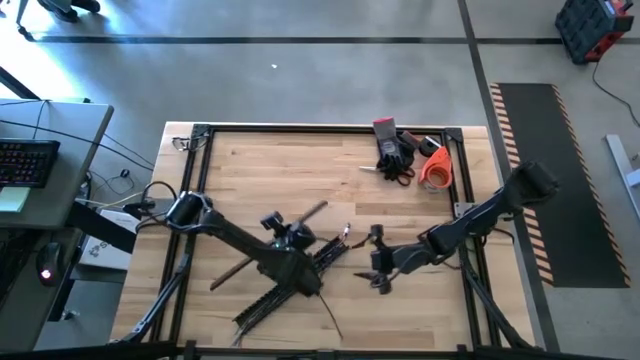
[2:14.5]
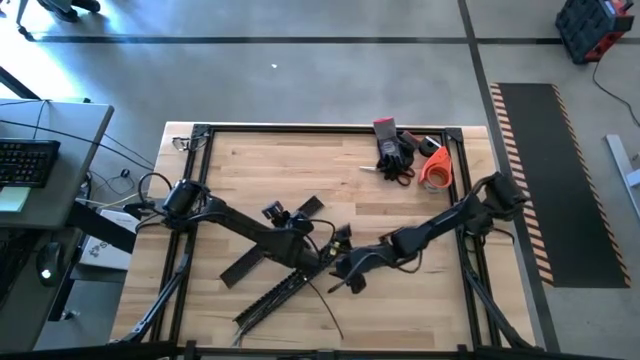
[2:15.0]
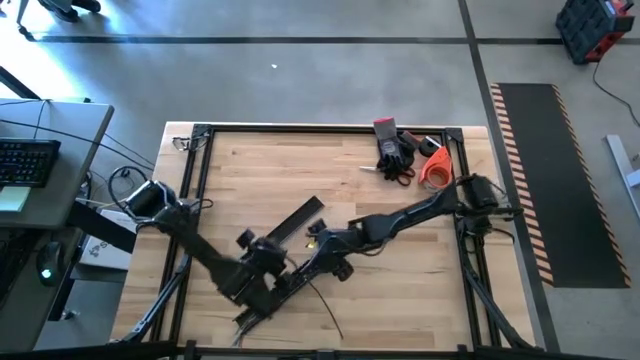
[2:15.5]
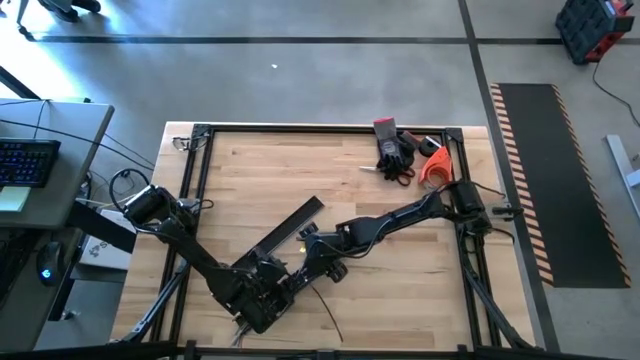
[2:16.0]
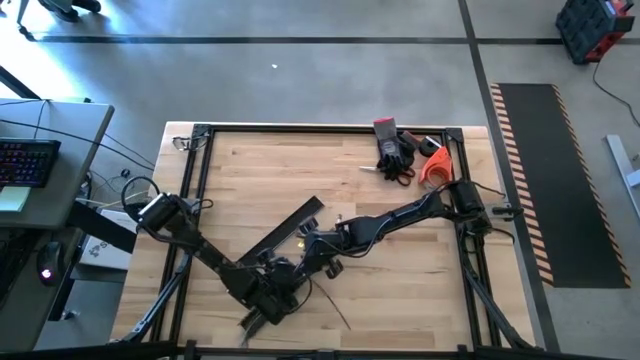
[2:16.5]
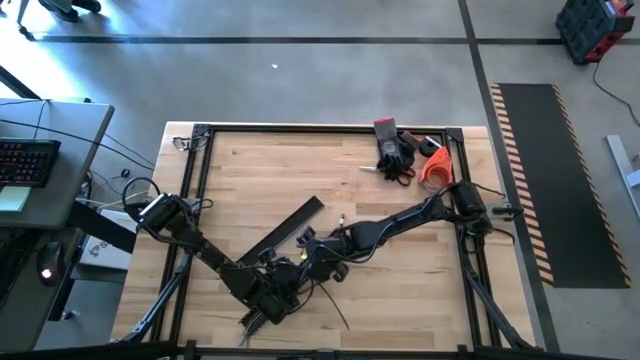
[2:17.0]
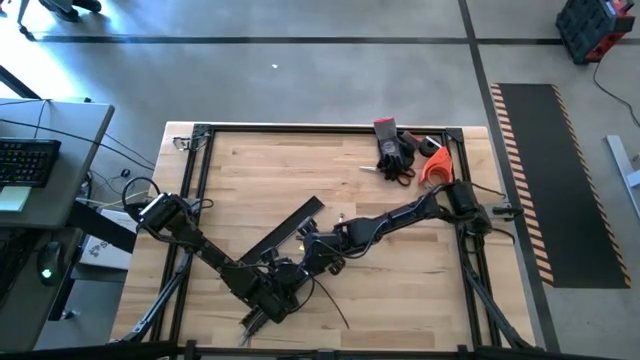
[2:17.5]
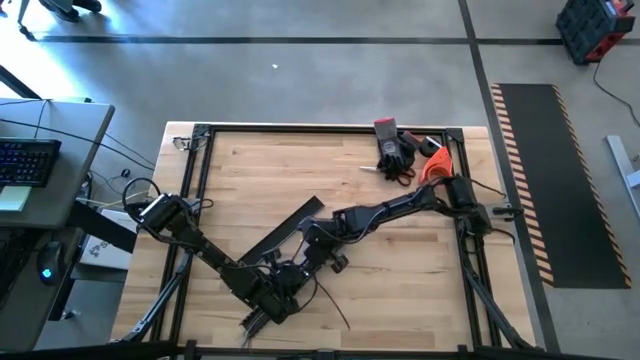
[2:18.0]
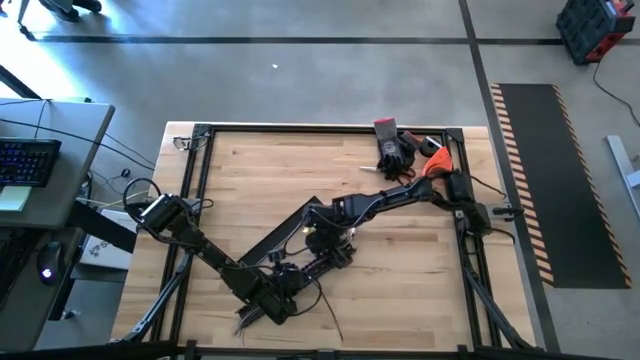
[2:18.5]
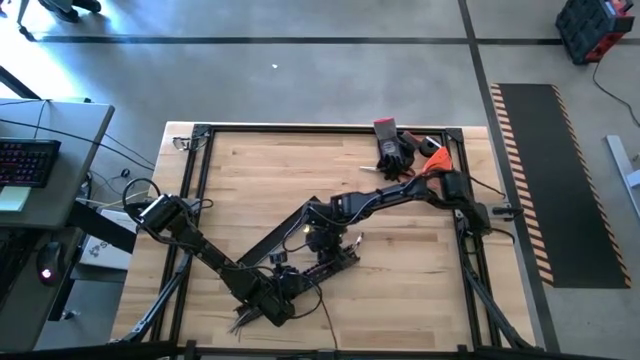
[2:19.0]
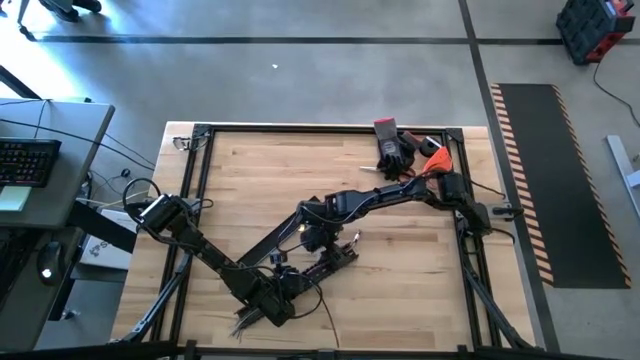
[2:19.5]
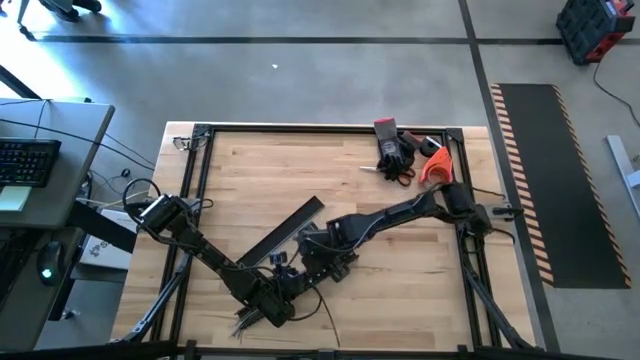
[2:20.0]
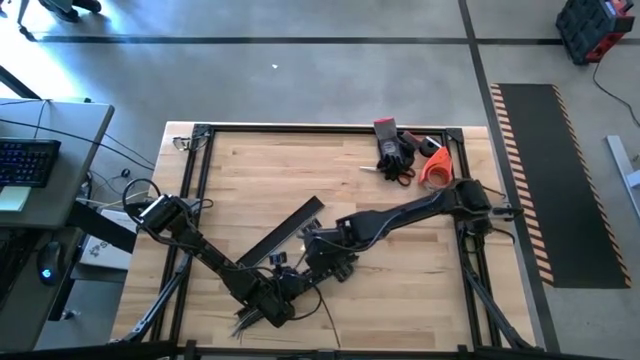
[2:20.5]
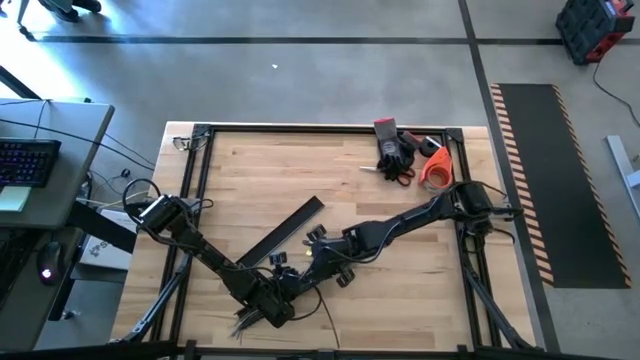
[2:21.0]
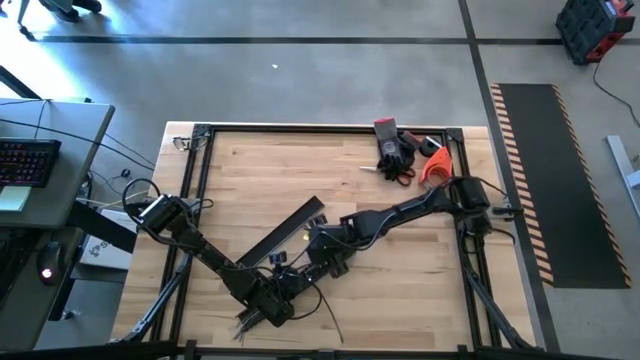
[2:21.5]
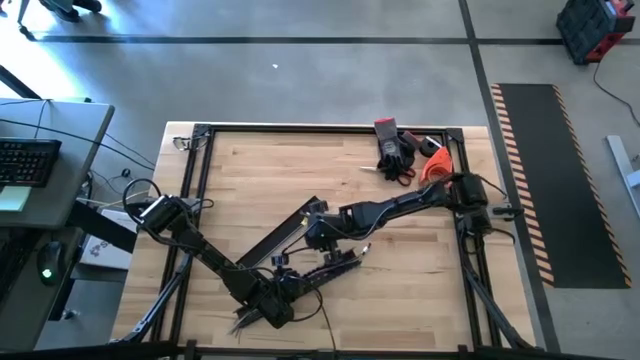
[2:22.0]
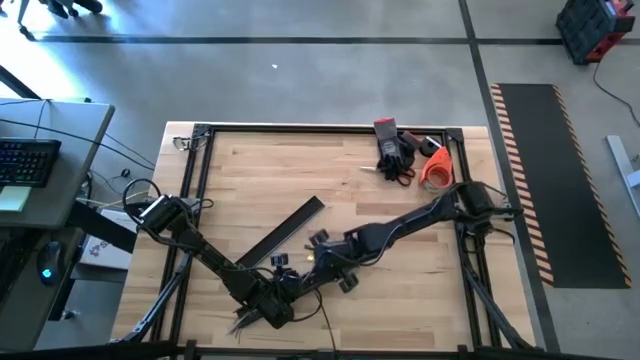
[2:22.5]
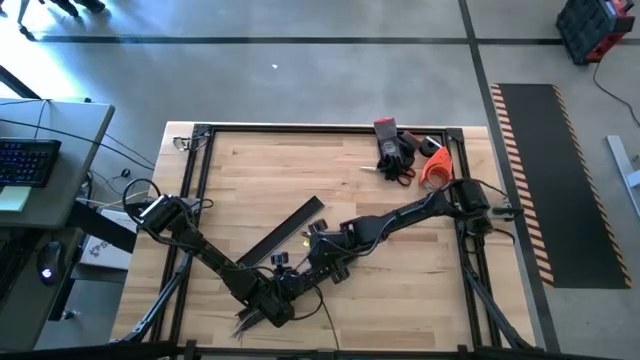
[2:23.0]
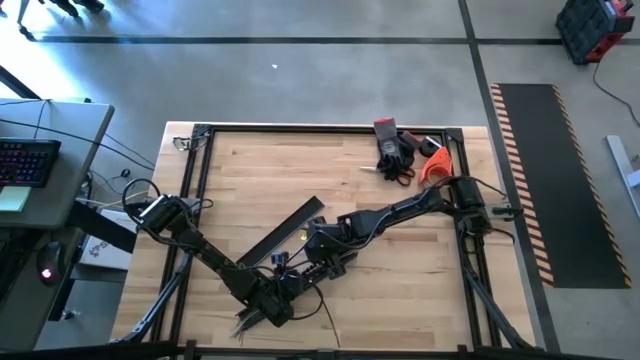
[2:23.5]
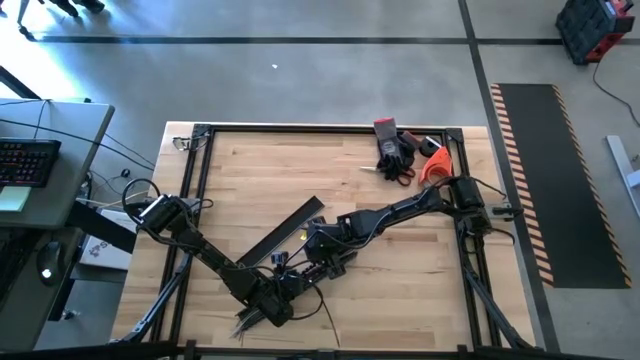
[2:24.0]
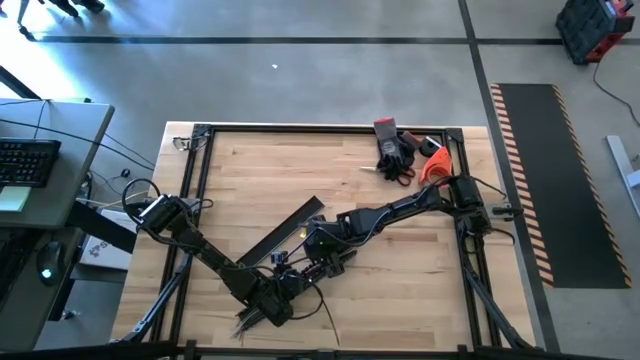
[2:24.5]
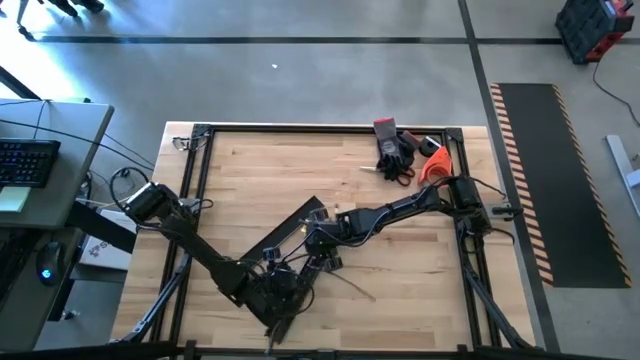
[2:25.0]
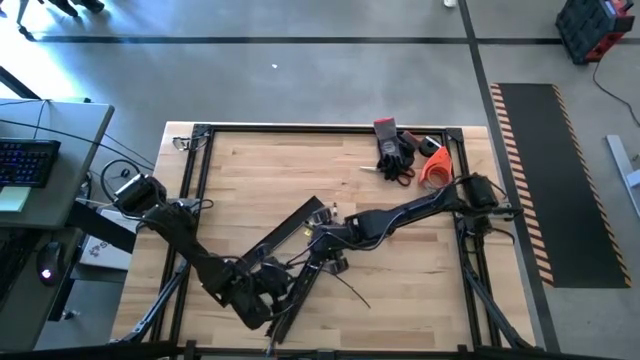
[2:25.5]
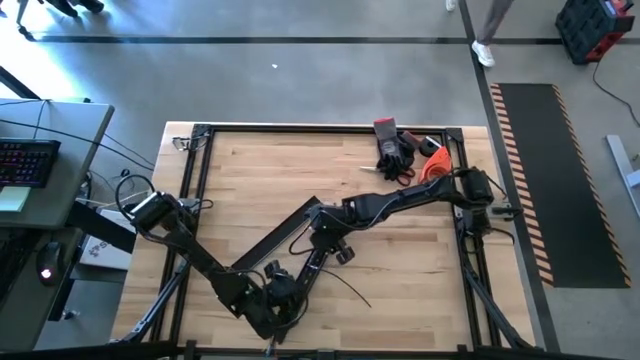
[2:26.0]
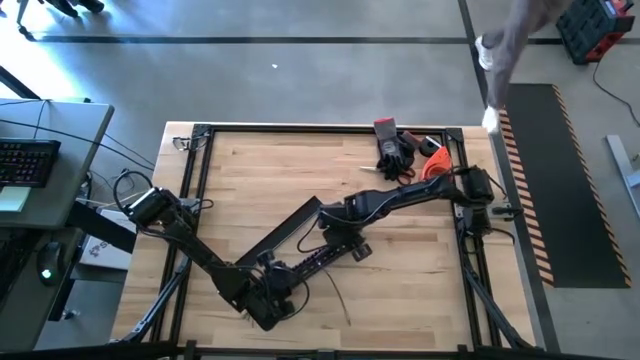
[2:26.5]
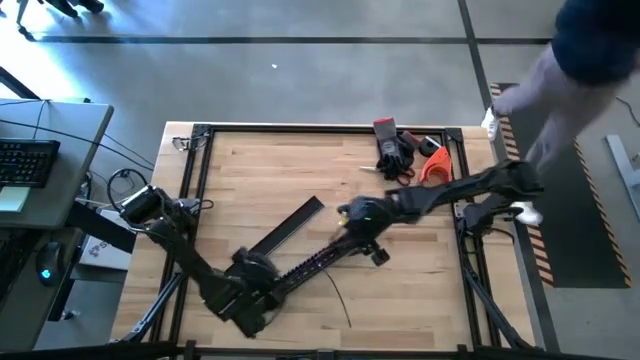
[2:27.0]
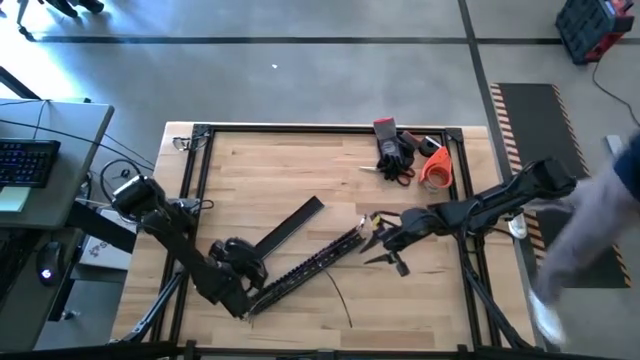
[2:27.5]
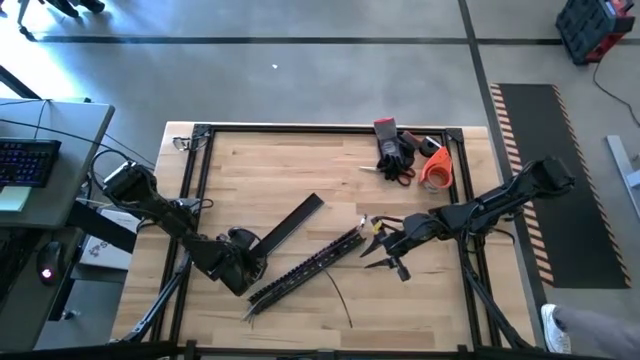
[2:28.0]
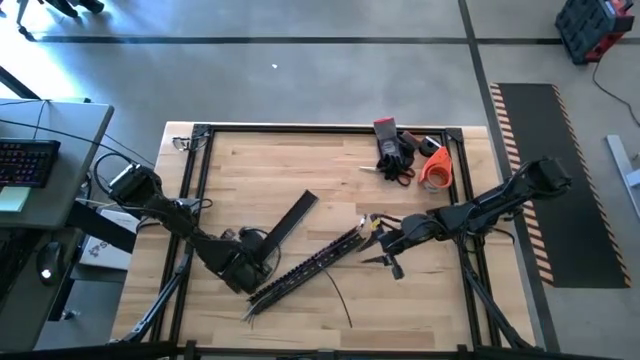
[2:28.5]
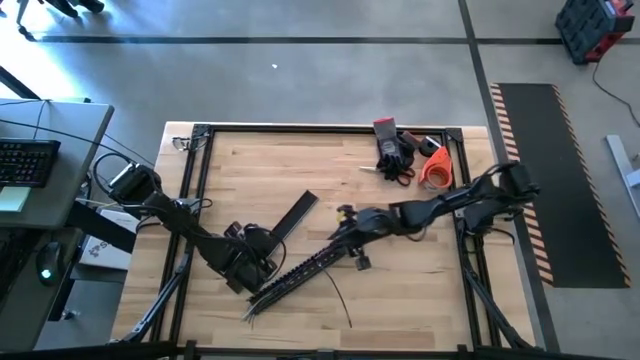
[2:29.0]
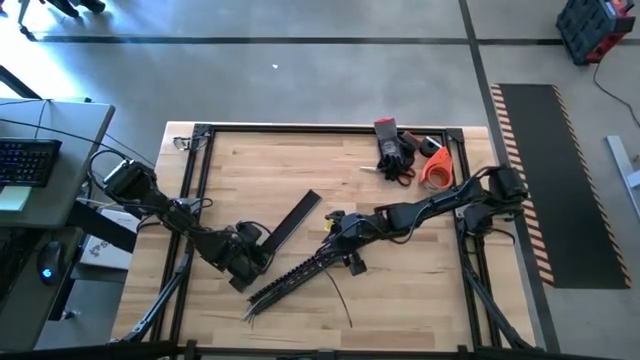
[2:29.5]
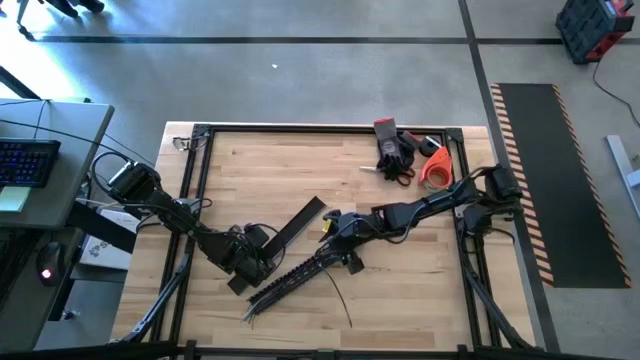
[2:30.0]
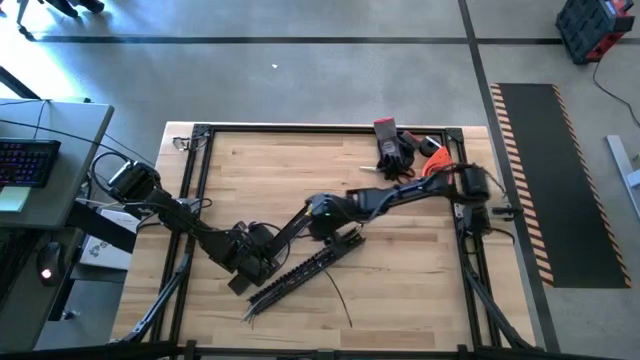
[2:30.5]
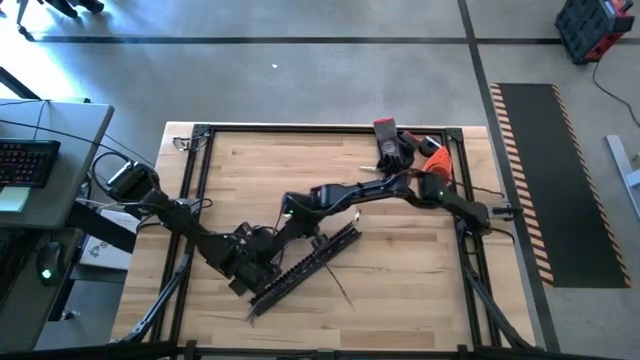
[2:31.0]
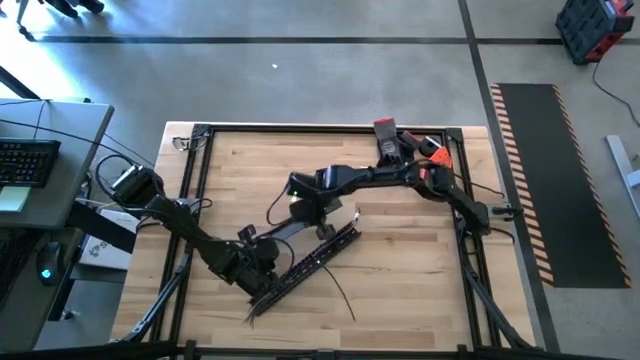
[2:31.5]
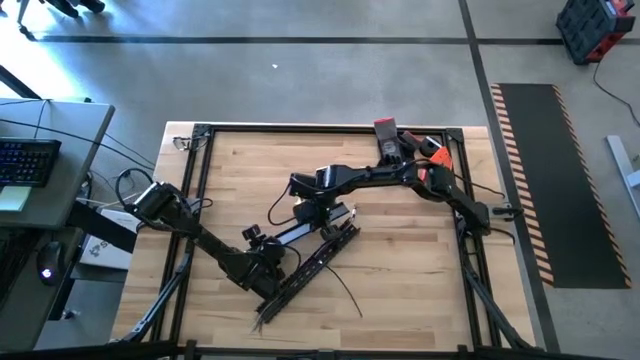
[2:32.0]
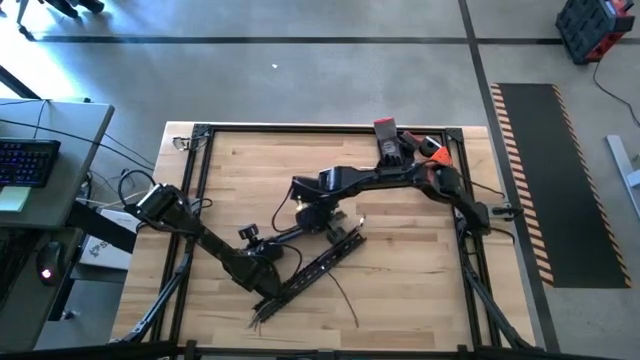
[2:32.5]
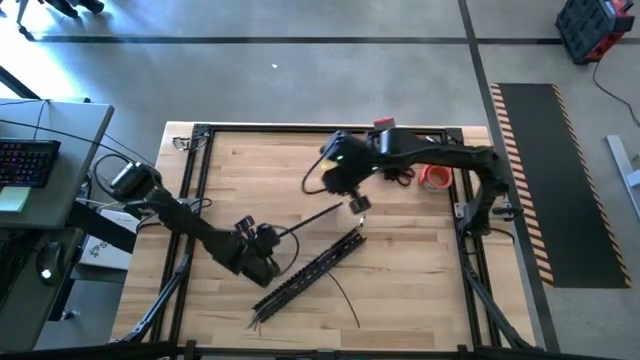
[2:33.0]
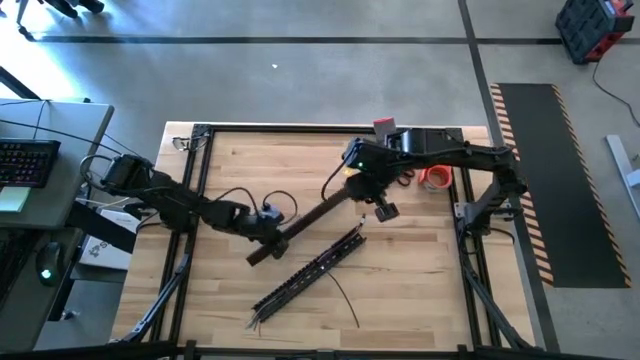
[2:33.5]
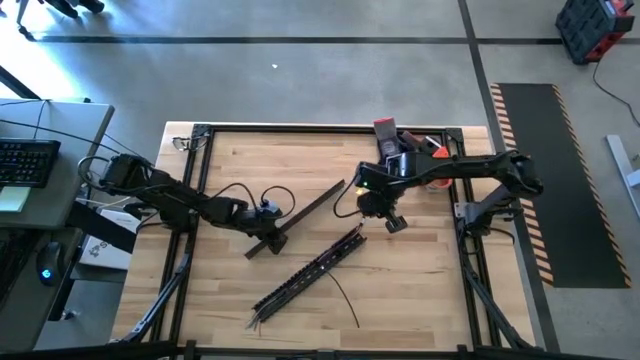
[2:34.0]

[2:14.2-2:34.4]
Task: Ziptie cables
Close the black cable duct with the black cable duct cover
